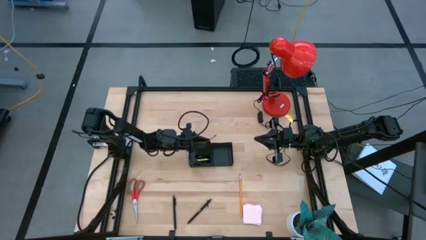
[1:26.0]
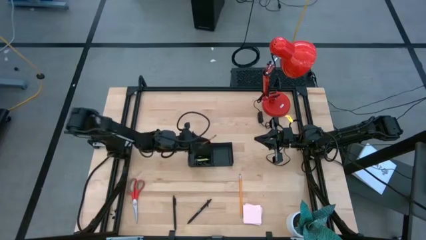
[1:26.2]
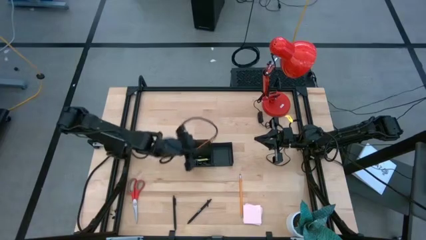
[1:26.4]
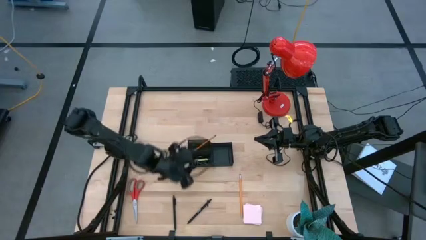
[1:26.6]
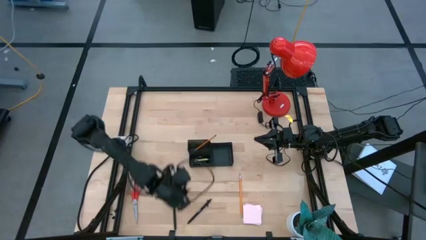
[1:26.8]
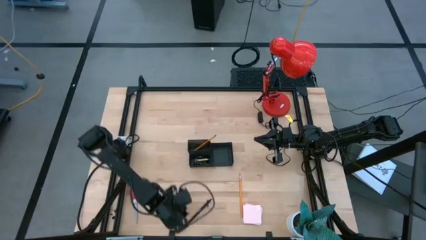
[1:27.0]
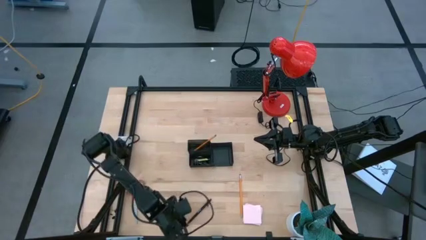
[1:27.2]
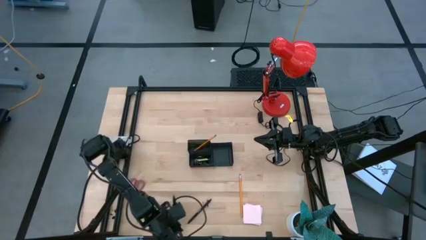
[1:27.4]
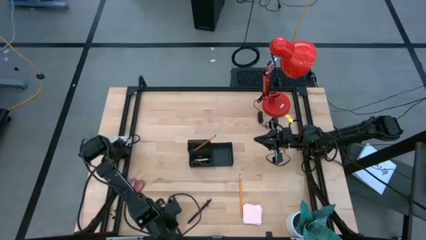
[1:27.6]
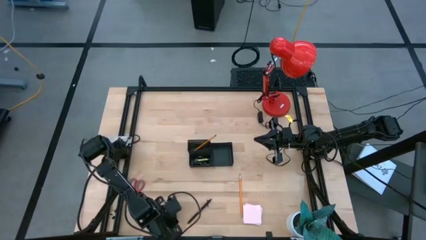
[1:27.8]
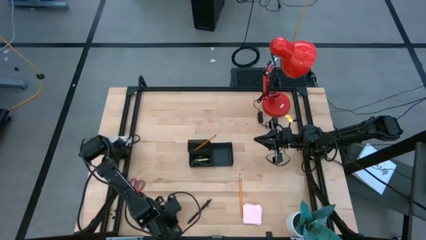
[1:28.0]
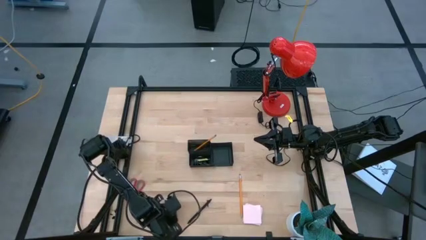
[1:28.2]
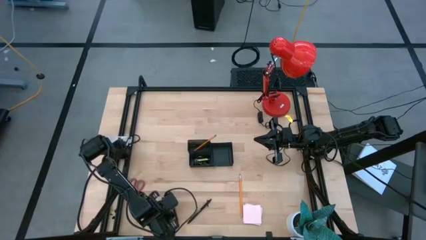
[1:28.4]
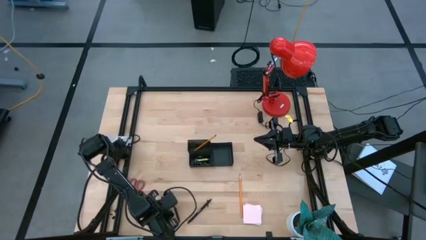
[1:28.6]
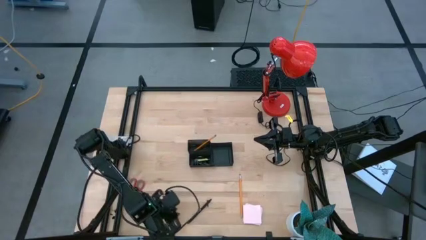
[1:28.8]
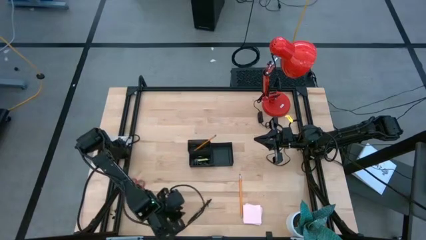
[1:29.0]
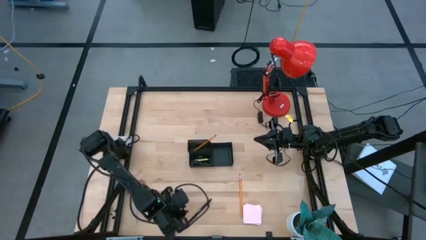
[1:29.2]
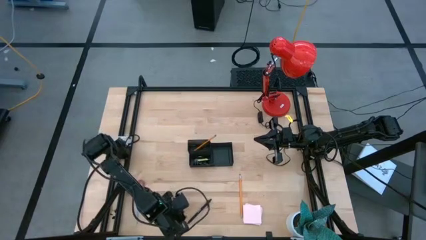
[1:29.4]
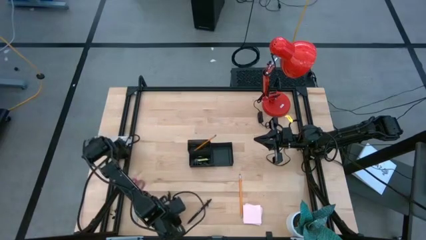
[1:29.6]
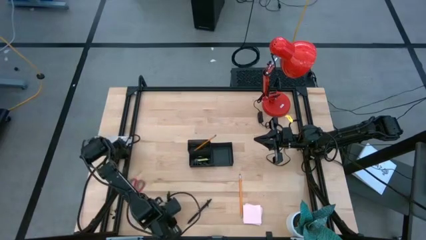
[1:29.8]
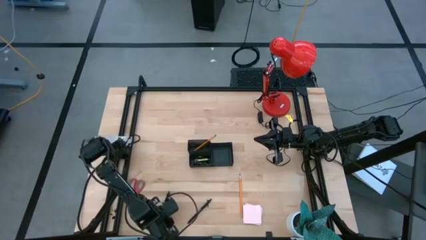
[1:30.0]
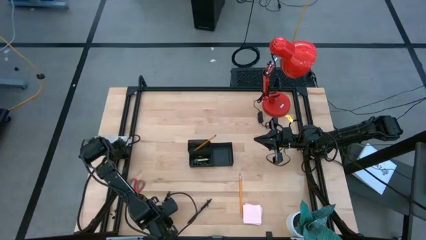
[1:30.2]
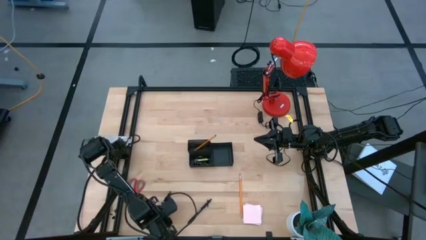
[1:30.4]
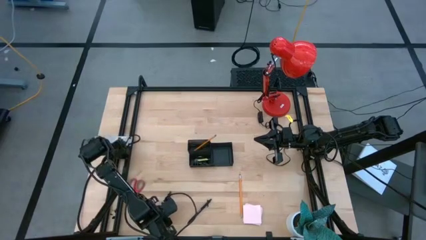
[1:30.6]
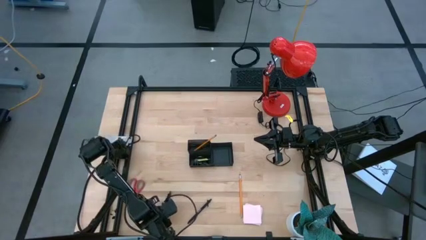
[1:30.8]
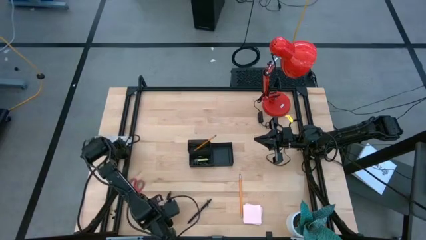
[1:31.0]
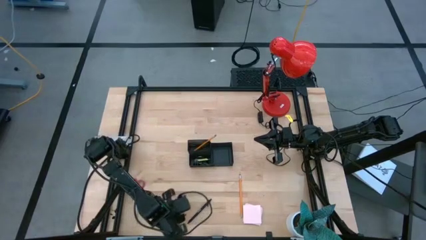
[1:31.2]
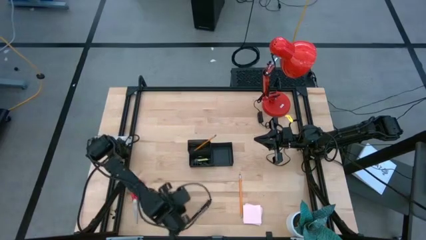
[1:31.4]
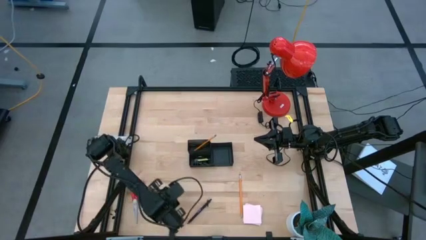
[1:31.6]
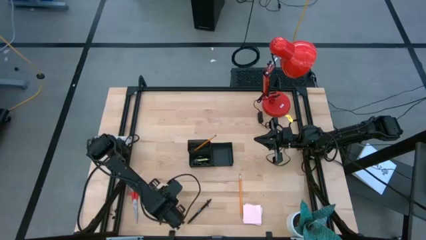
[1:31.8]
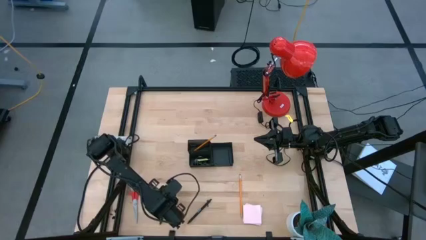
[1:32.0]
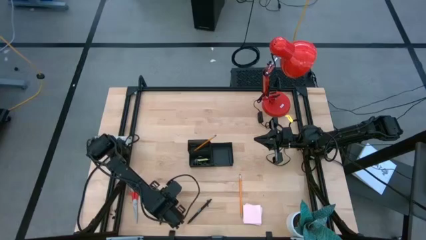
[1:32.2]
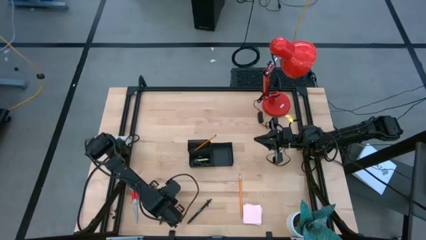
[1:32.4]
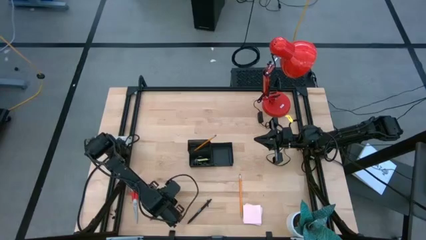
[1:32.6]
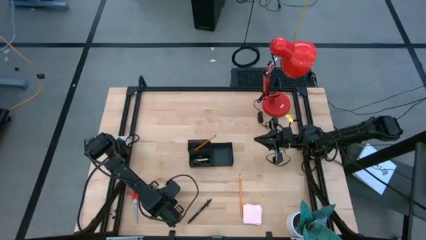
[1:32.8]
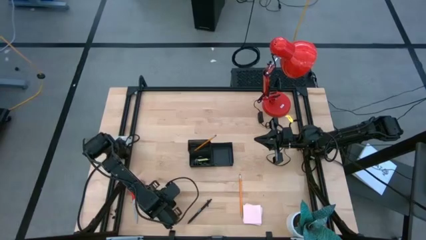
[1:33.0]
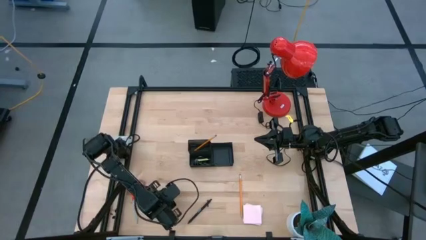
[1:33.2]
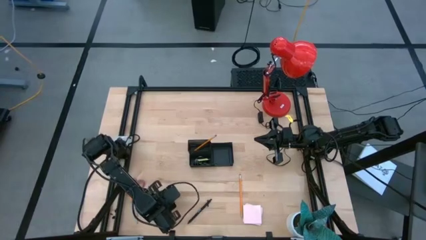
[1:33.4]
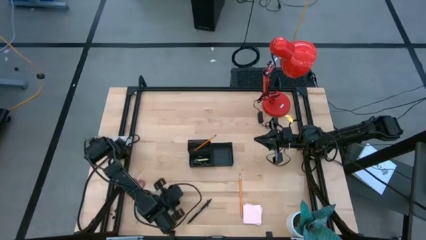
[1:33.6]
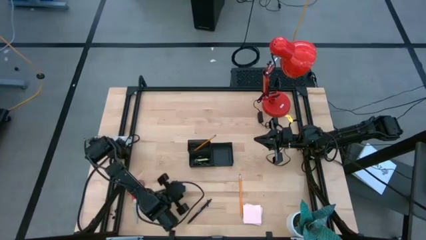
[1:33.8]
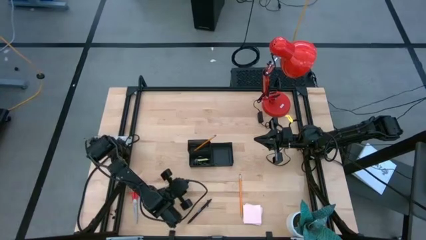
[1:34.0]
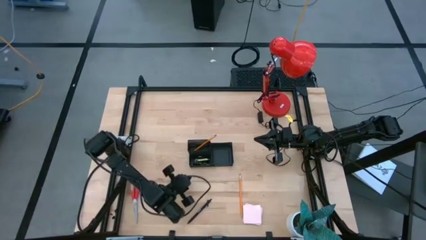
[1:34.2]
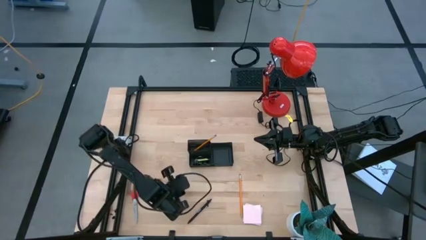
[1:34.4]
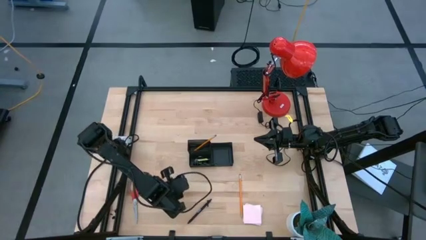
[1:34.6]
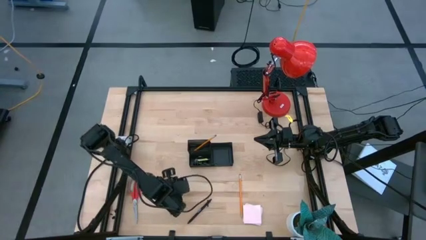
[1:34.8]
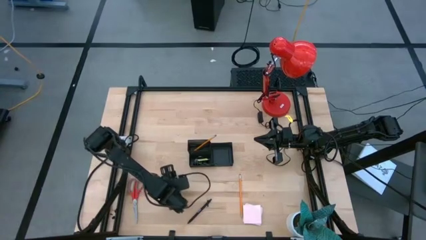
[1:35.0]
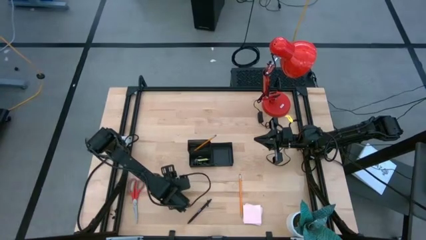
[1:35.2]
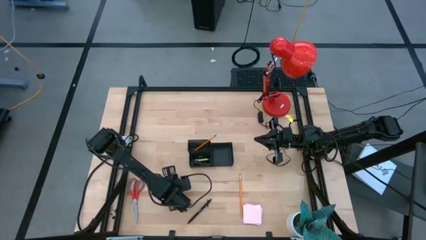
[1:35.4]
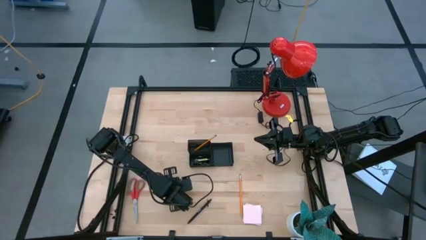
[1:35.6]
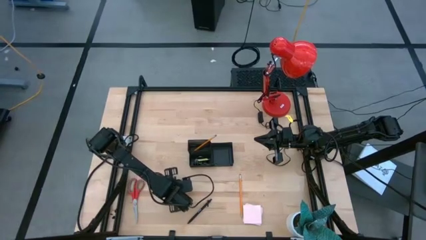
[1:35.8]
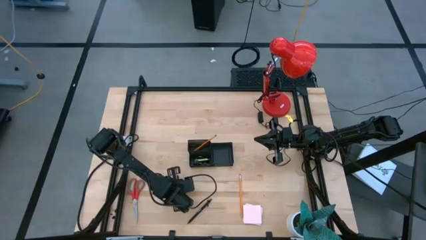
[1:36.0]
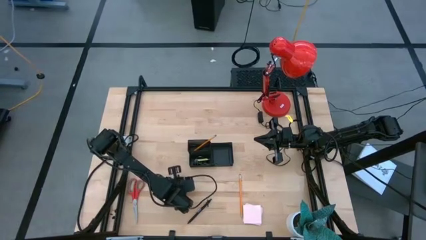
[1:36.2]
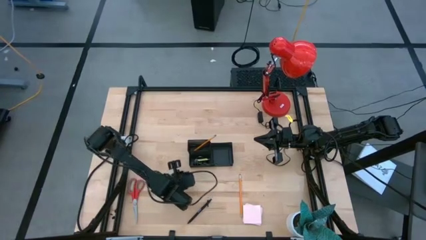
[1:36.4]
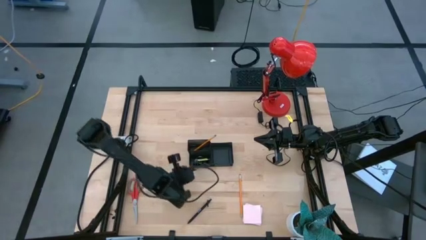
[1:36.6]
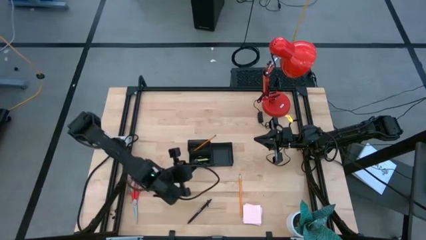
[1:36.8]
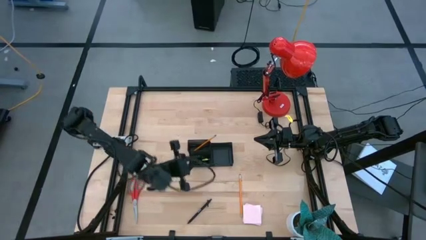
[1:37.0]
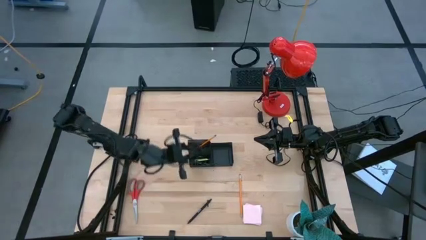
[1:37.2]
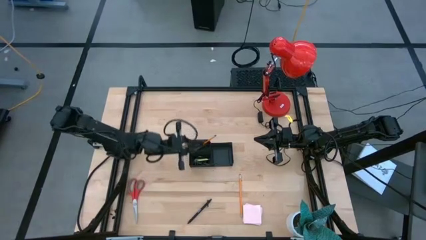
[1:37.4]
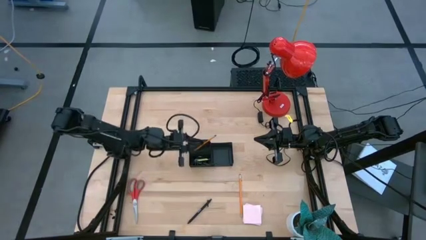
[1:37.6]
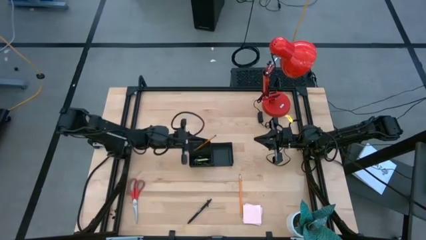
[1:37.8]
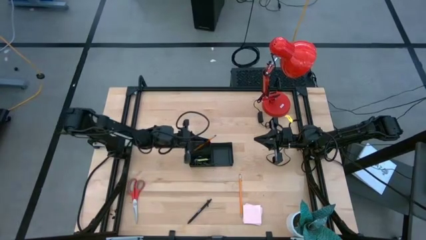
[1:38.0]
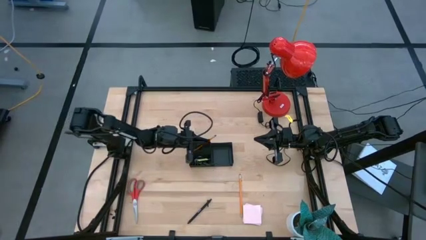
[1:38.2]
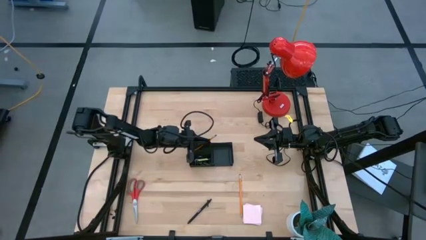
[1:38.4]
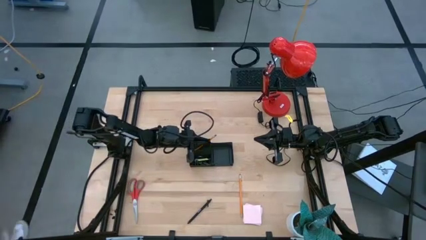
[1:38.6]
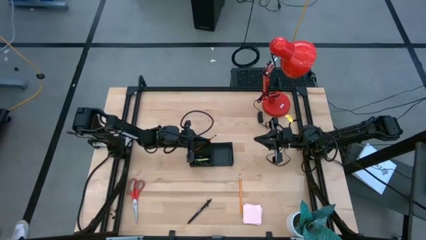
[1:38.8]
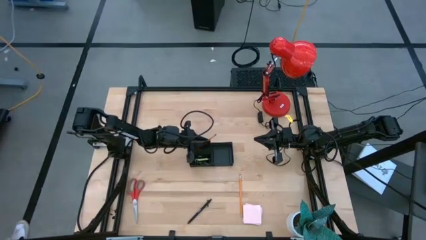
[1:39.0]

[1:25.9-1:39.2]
Task: Pick and place office supplies into organizer
Put the black pen into the mesh desk organizer
